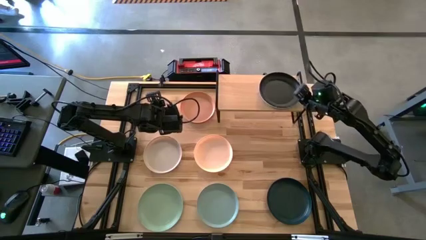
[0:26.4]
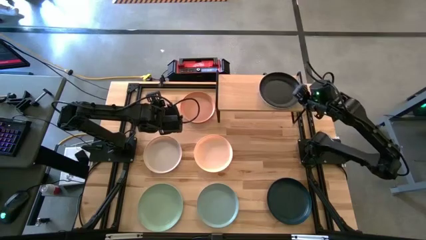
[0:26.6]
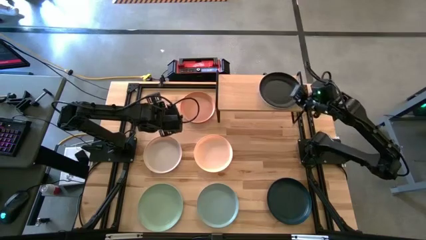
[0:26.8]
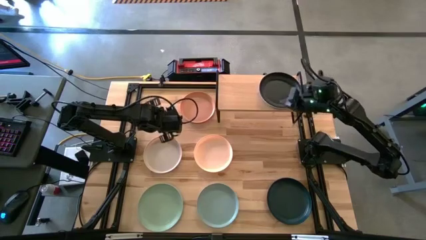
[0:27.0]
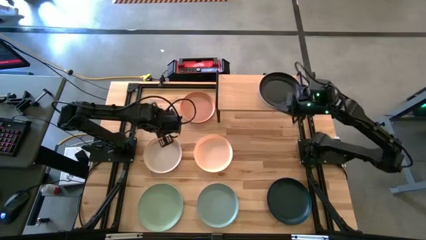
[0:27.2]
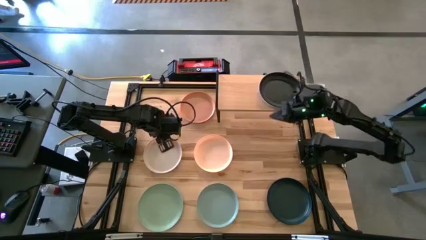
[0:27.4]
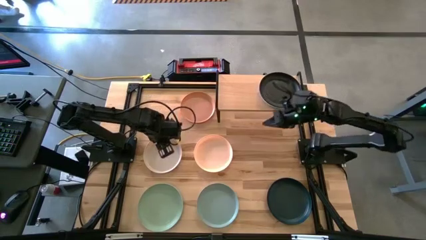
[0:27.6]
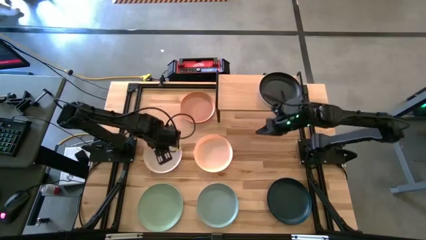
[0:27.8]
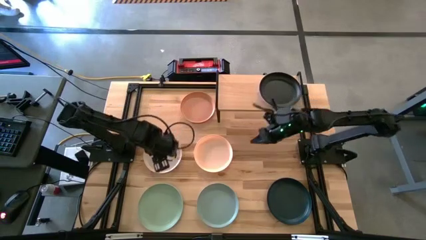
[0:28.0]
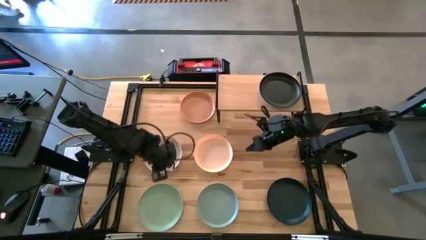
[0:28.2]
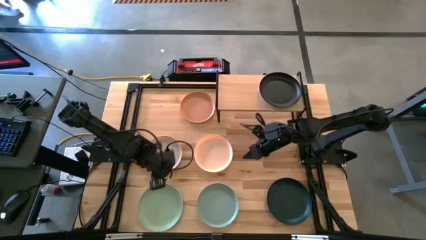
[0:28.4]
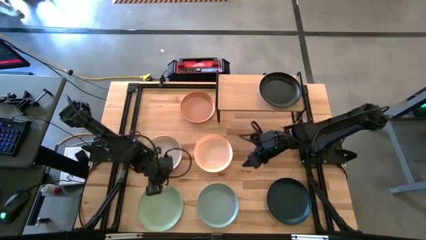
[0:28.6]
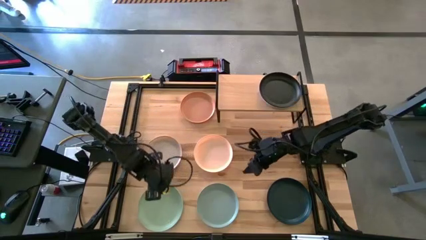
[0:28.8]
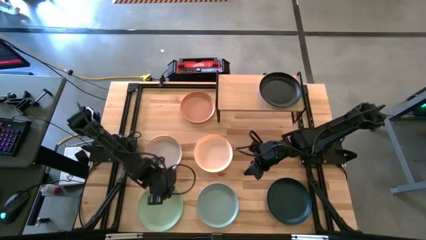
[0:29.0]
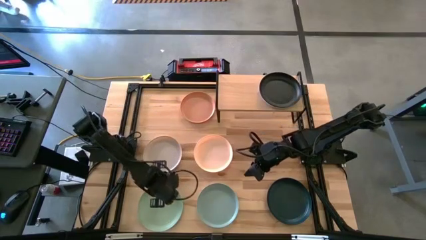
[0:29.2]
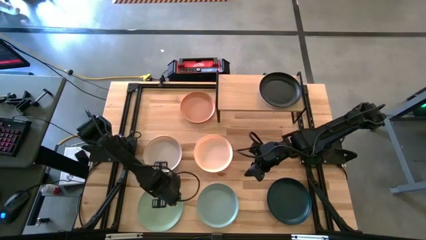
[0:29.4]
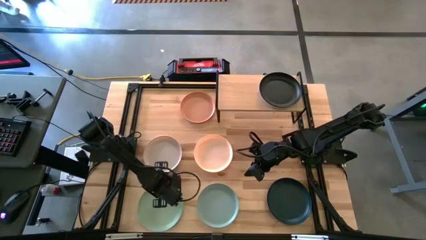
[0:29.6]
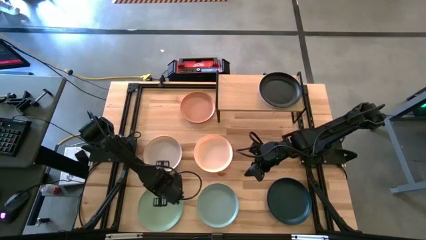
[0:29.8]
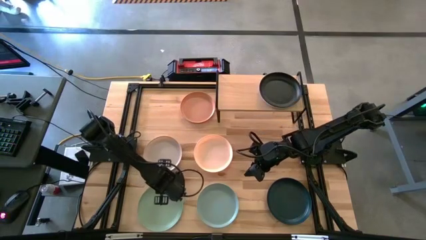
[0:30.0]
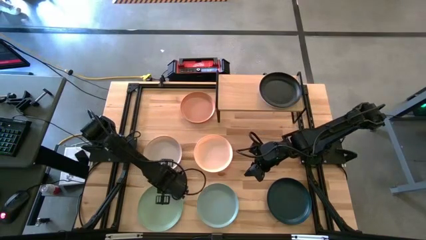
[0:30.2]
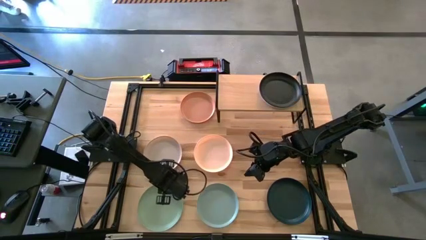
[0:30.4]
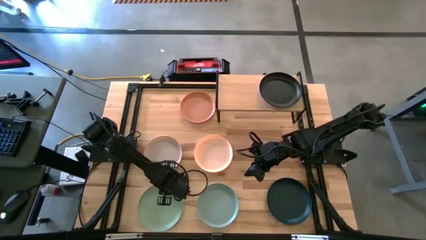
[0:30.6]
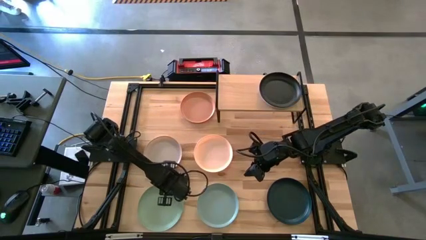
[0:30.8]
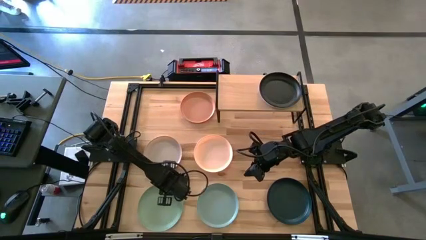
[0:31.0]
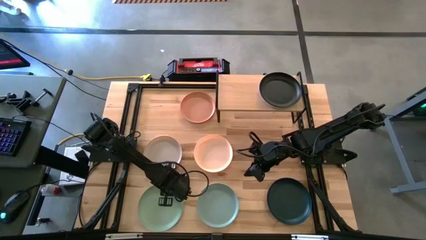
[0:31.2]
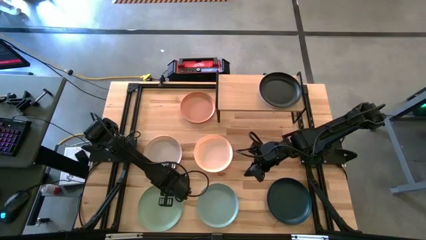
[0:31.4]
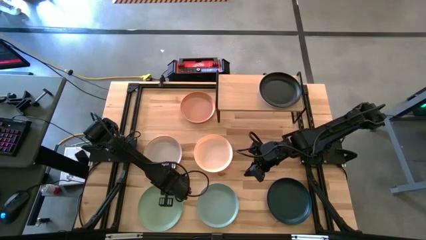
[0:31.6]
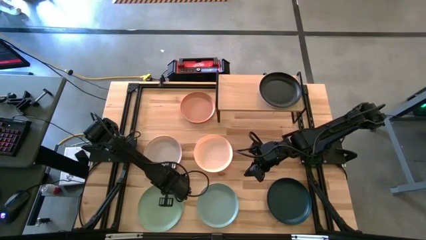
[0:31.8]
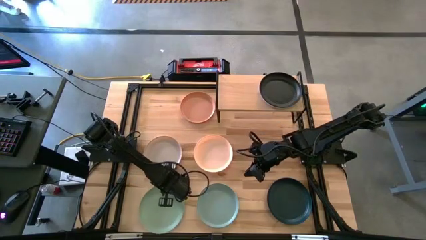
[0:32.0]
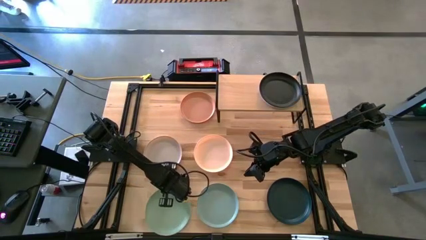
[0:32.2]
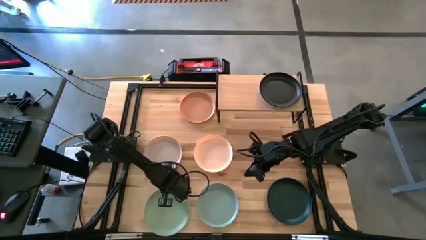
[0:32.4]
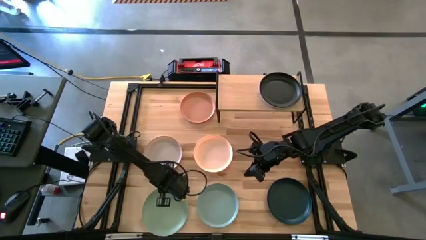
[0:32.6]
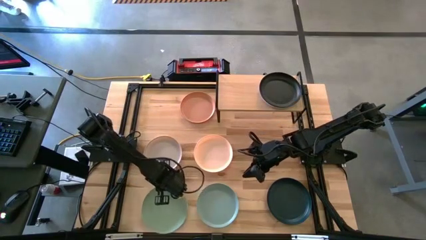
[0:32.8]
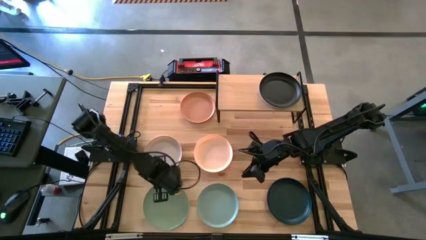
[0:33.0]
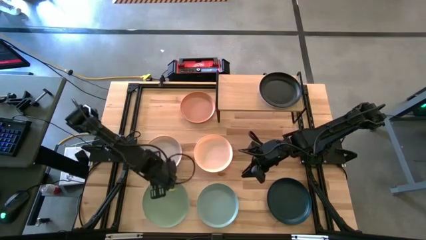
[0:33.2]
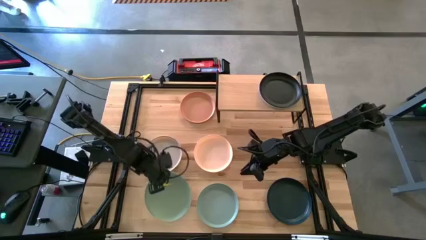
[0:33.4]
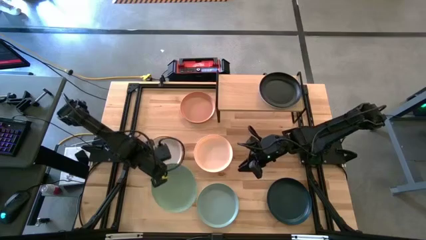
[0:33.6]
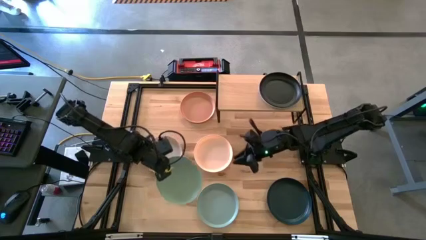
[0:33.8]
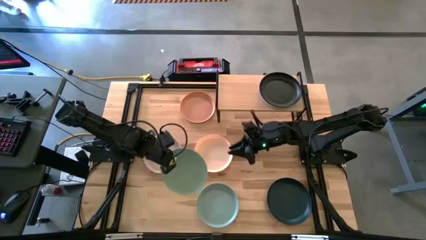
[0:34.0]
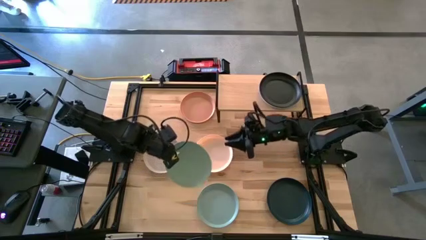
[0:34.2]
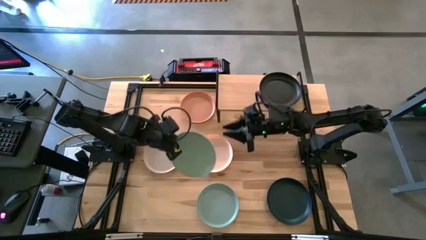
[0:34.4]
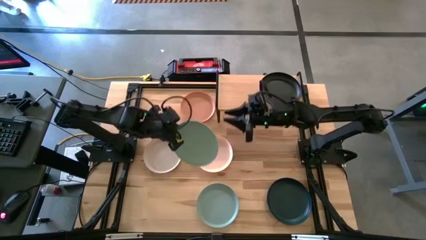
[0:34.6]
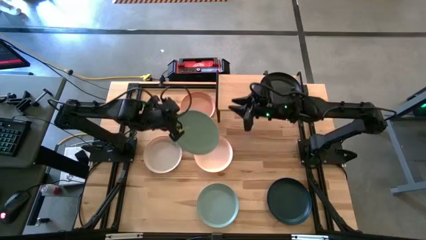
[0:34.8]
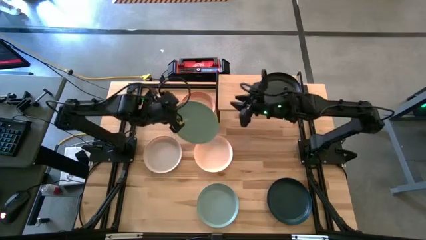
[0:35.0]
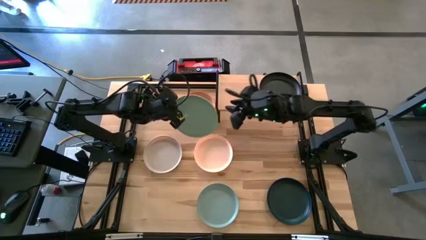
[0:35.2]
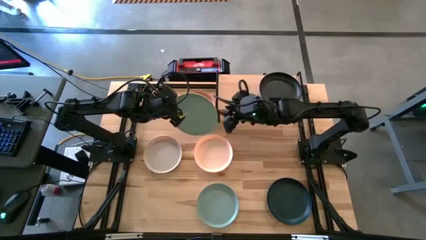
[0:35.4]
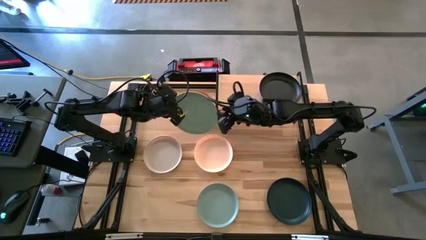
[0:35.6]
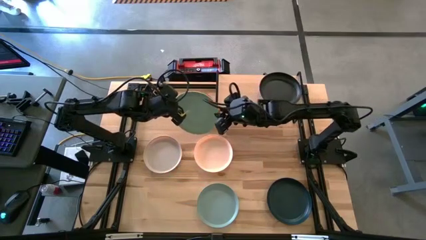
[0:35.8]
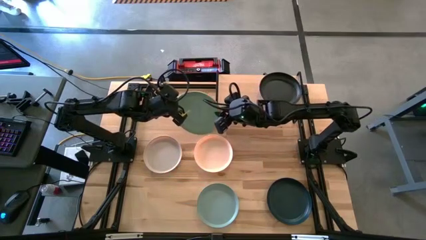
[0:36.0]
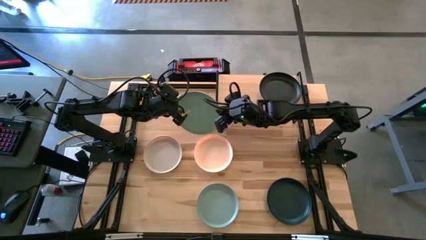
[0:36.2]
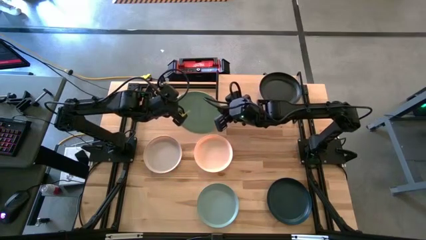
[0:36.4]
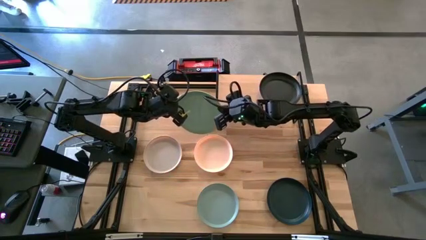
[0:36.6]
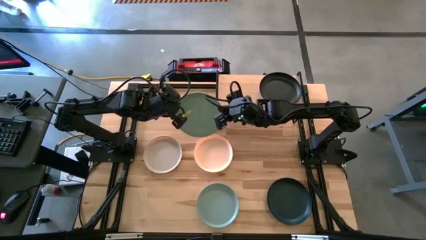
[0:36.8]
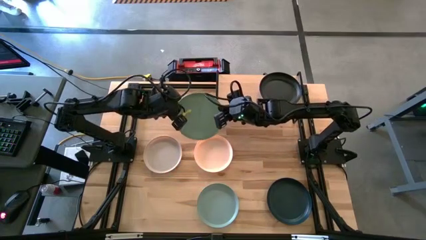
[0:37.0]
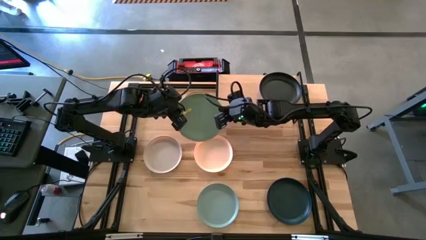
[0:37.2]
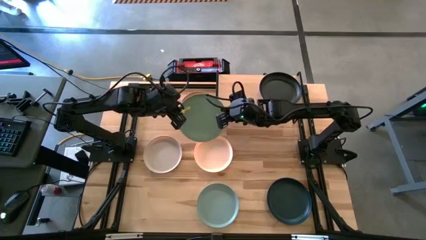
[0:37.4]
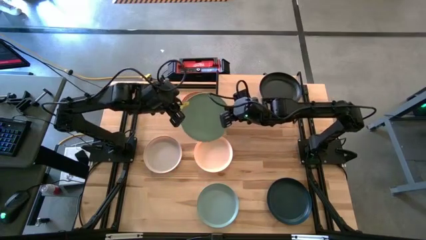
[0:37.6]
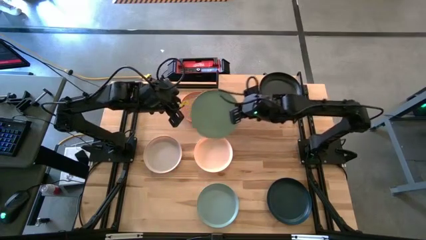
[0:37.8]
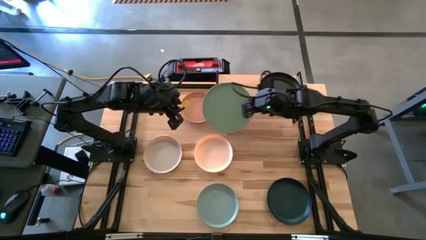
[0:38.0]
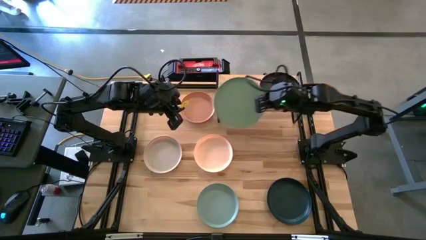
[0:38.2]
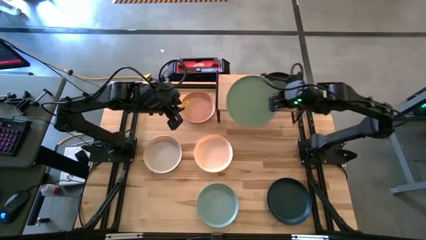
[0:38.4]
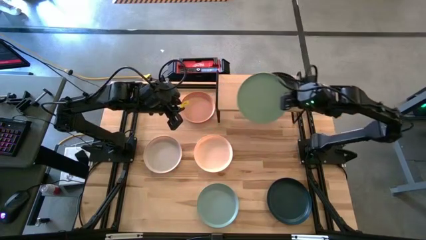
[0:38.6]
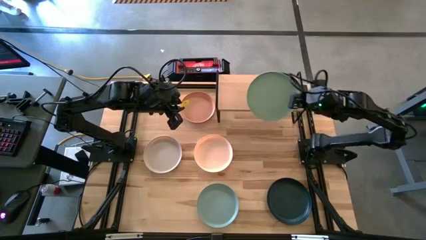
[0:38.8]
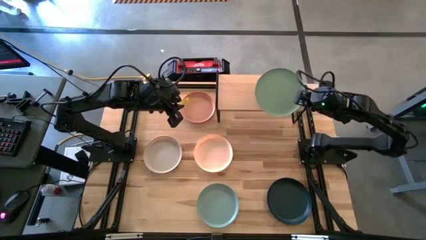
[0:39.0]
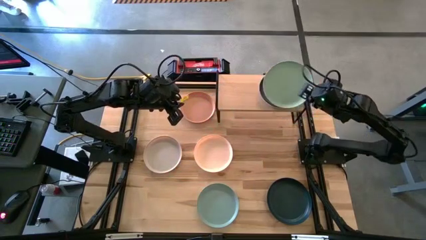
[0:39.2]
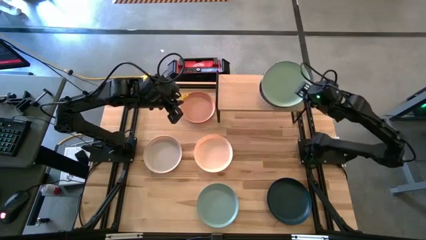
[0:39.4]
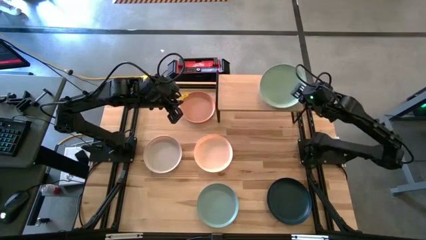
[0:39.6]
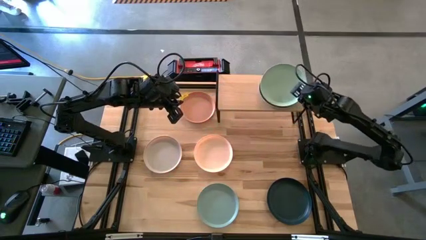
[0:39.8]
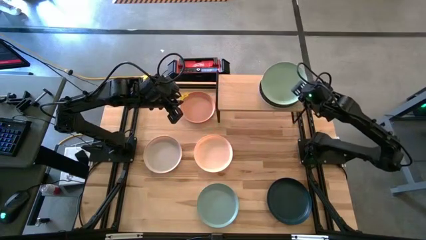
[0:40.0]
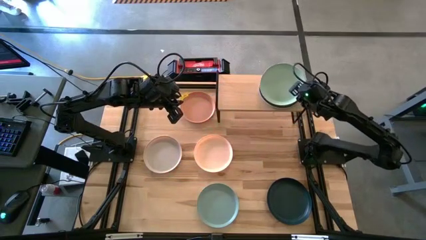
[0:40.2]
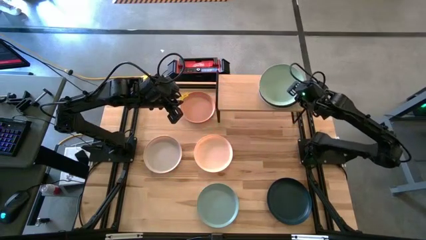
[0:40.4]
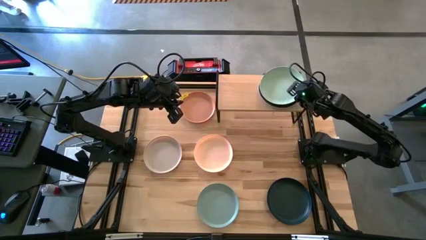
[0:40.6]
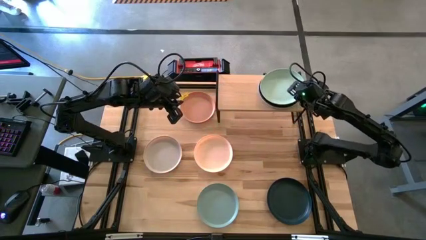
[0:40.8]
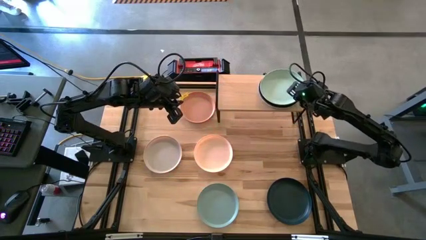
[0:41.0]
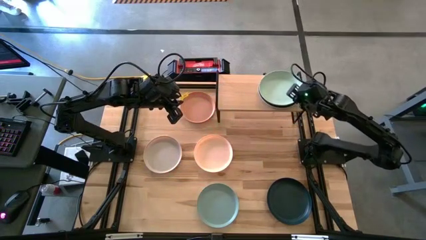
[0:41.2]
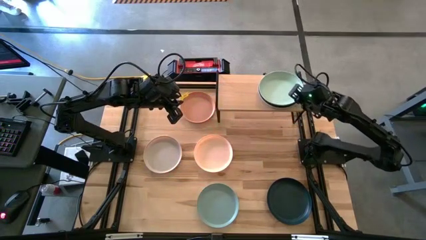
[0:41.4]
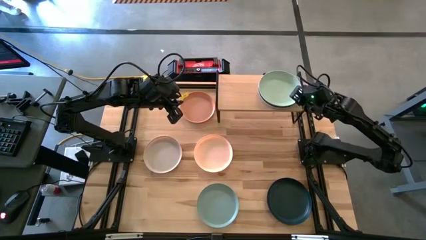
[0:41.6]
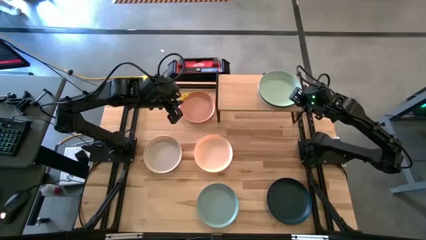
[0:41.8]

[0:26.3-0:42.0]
Task: Place and stack plates onto a shelf
Stack the light green plate on top of the black plate on the shelf
